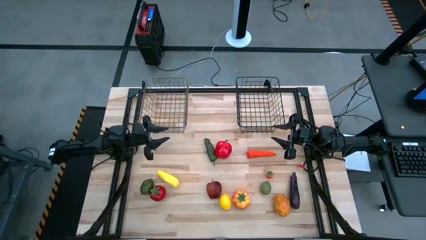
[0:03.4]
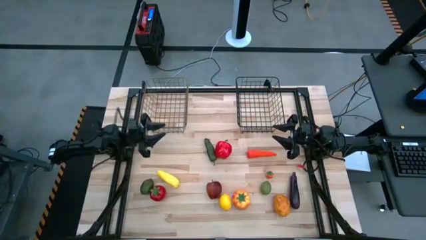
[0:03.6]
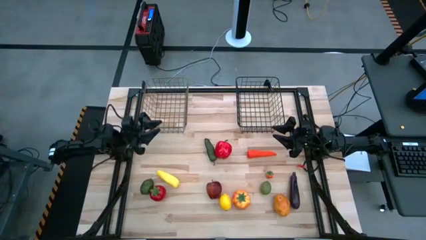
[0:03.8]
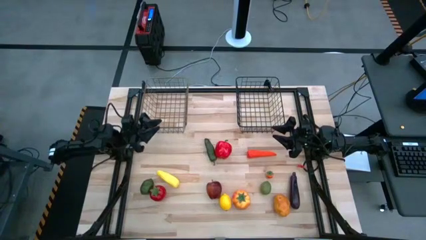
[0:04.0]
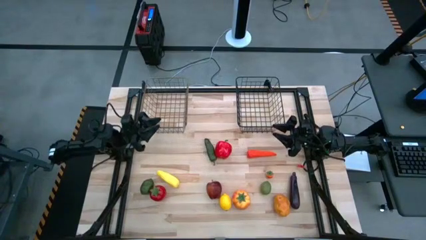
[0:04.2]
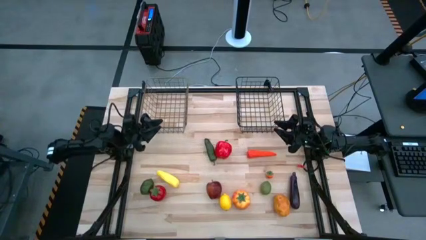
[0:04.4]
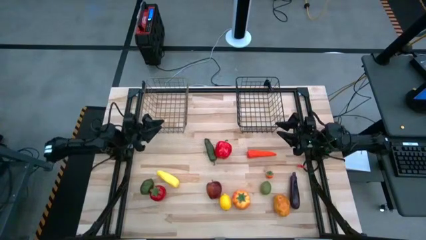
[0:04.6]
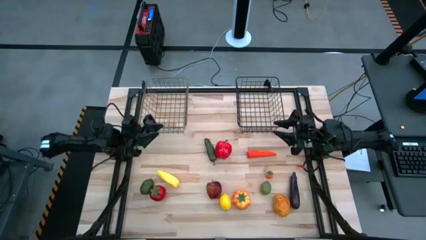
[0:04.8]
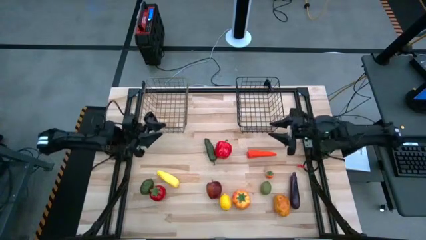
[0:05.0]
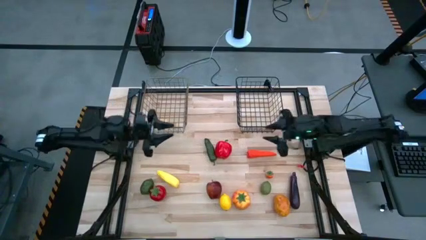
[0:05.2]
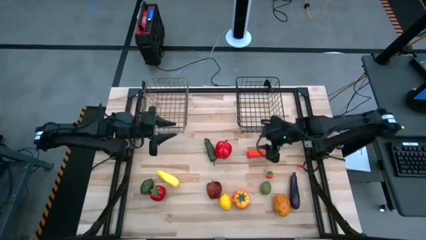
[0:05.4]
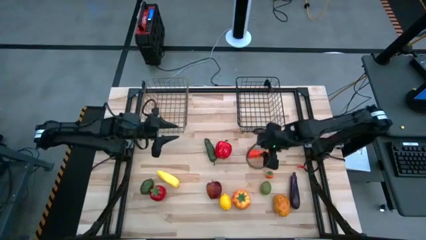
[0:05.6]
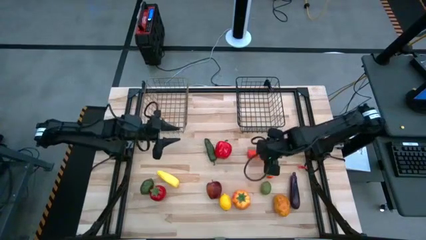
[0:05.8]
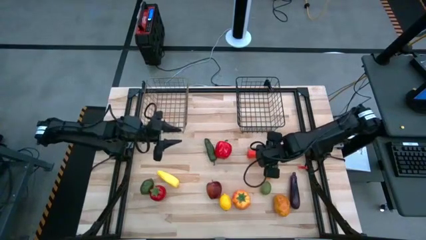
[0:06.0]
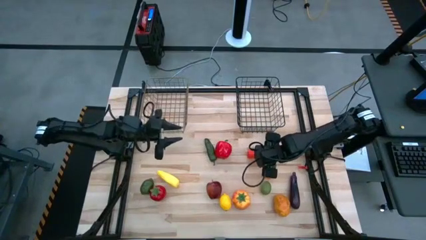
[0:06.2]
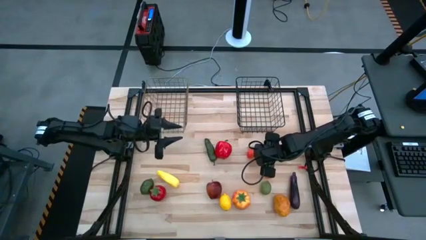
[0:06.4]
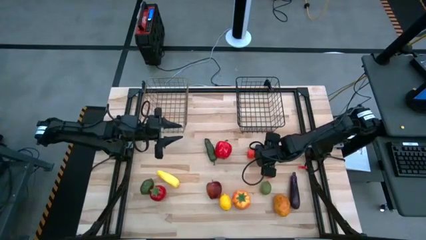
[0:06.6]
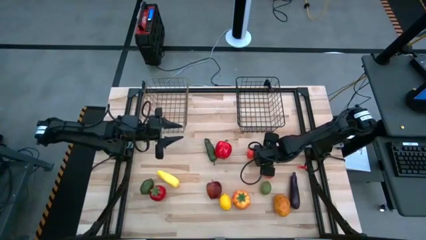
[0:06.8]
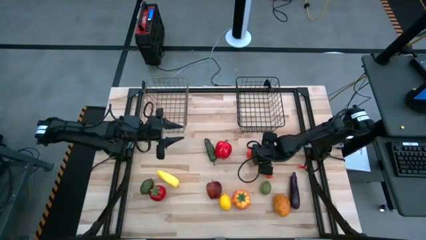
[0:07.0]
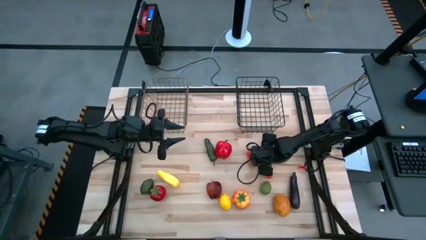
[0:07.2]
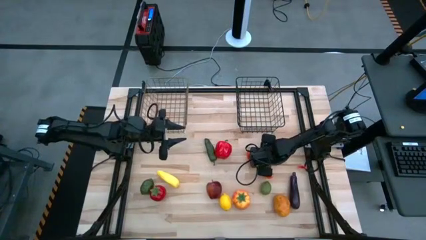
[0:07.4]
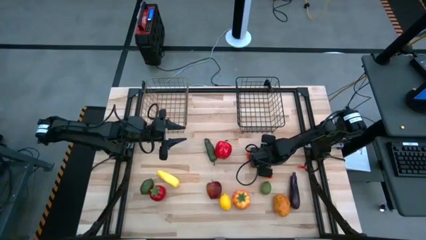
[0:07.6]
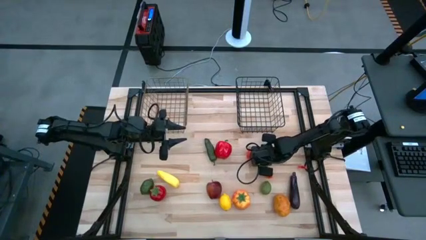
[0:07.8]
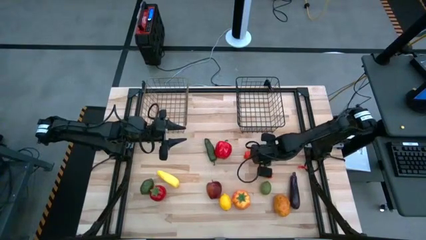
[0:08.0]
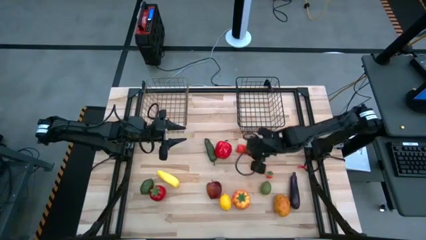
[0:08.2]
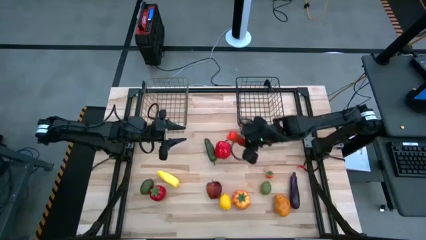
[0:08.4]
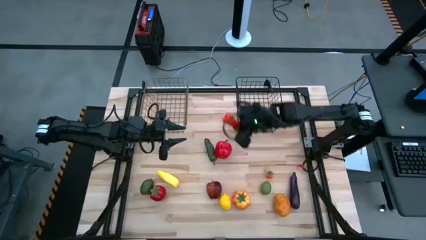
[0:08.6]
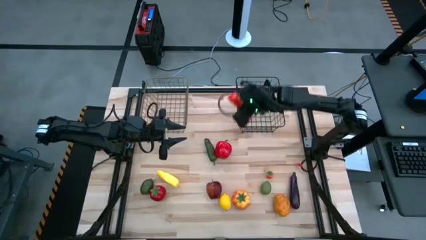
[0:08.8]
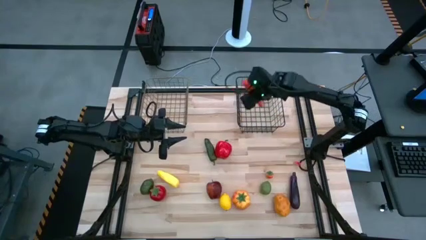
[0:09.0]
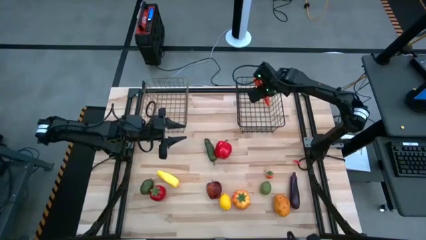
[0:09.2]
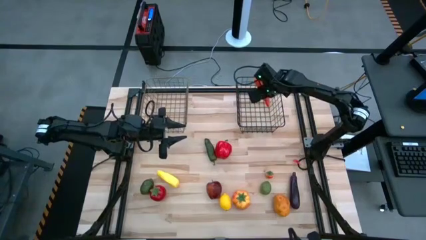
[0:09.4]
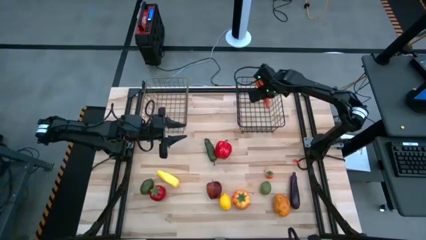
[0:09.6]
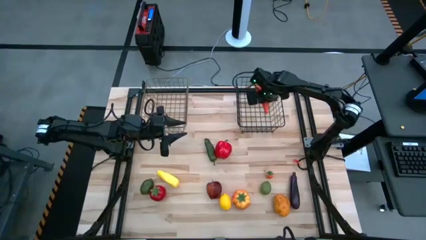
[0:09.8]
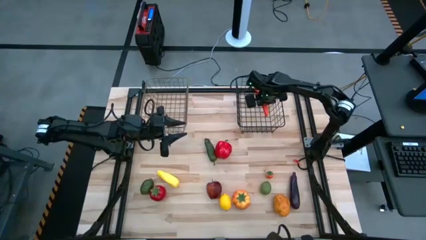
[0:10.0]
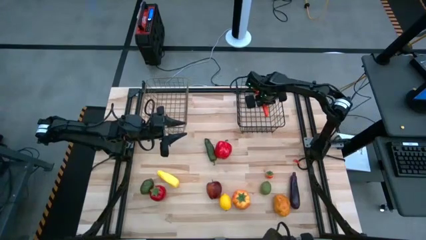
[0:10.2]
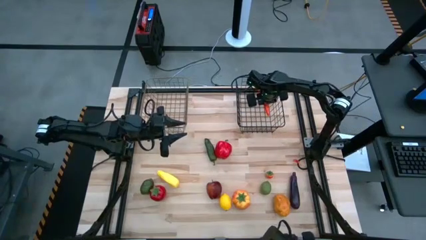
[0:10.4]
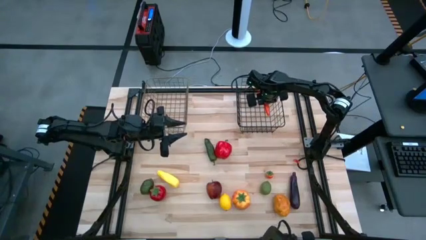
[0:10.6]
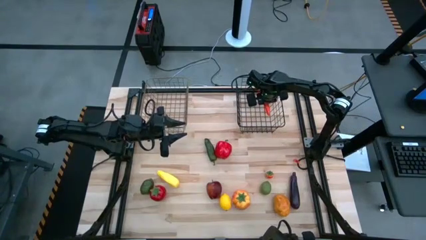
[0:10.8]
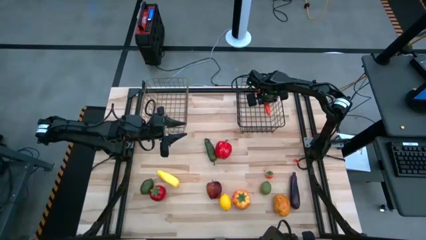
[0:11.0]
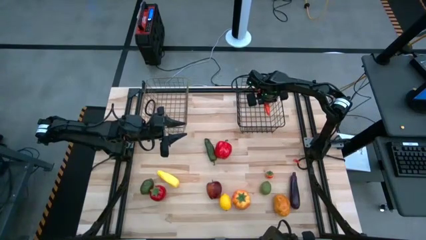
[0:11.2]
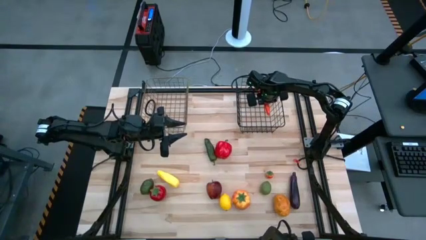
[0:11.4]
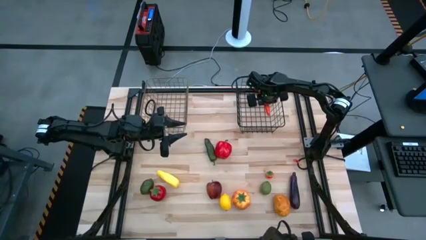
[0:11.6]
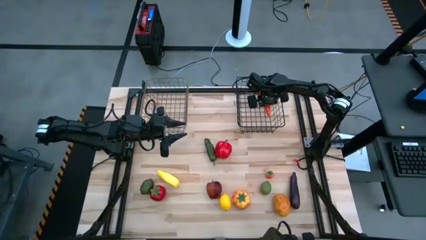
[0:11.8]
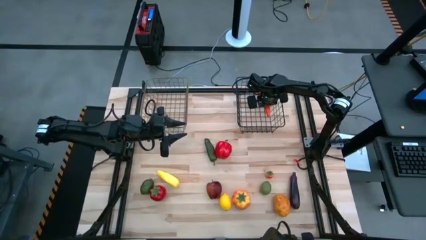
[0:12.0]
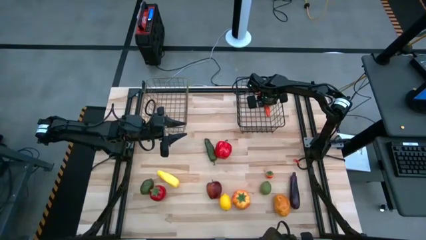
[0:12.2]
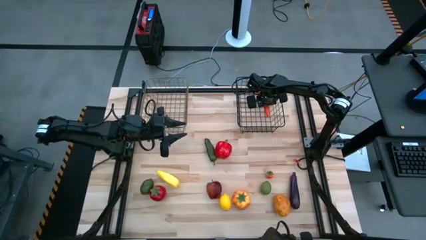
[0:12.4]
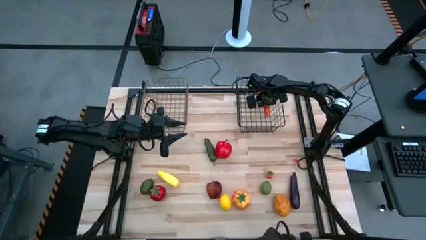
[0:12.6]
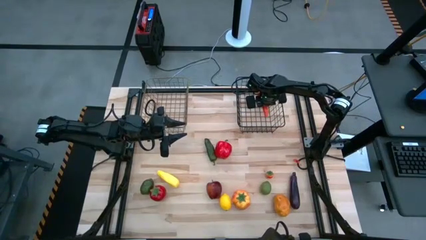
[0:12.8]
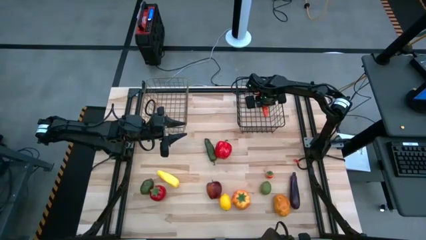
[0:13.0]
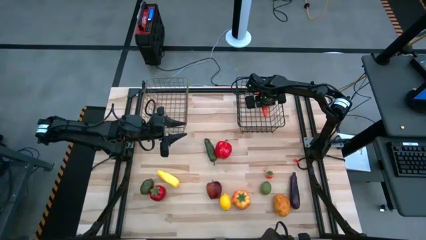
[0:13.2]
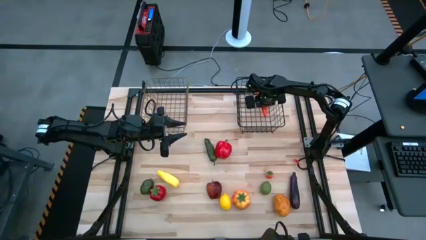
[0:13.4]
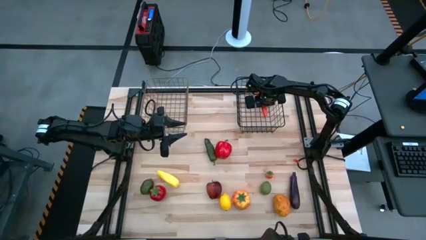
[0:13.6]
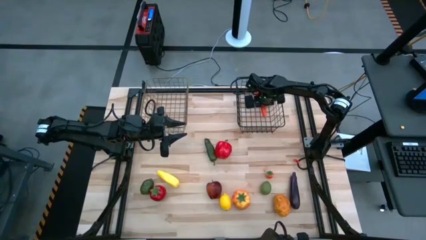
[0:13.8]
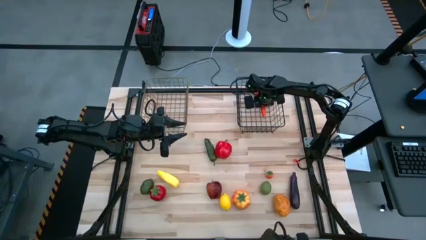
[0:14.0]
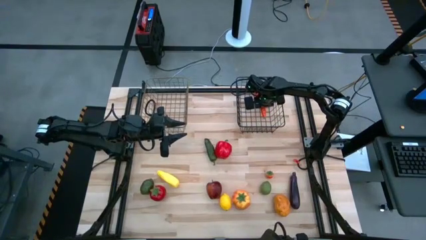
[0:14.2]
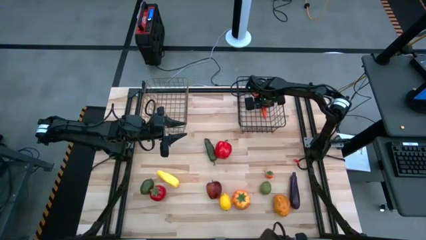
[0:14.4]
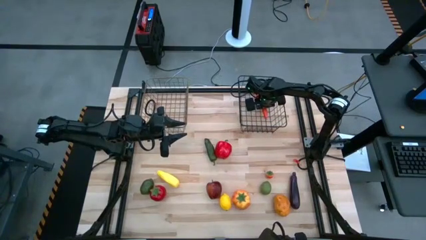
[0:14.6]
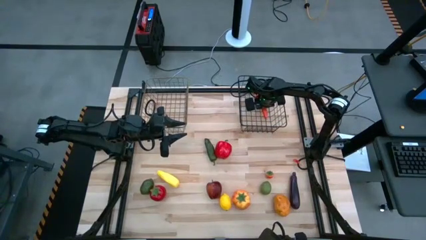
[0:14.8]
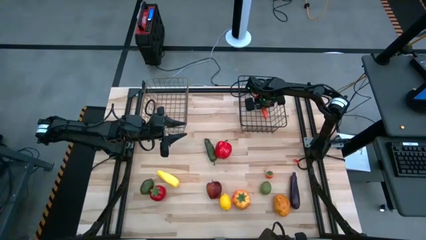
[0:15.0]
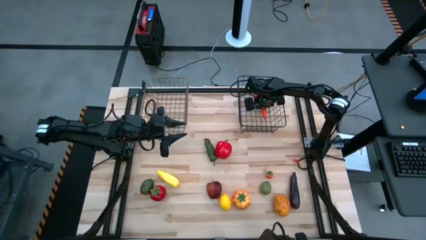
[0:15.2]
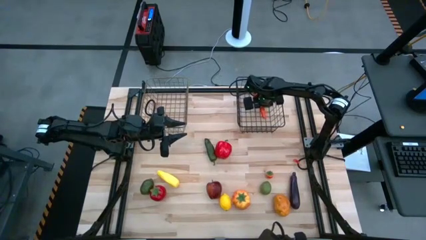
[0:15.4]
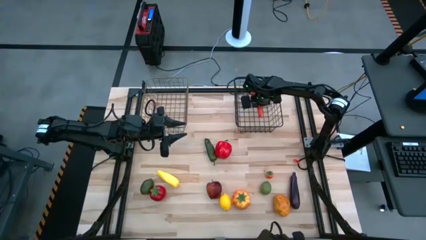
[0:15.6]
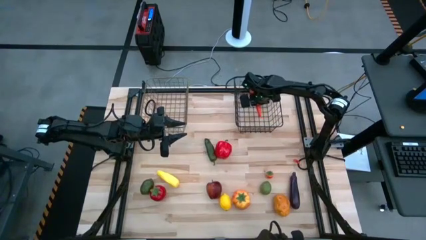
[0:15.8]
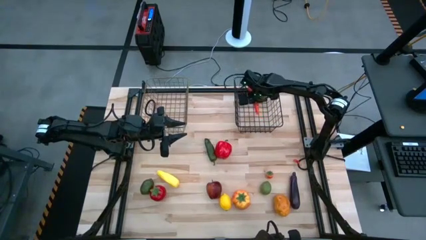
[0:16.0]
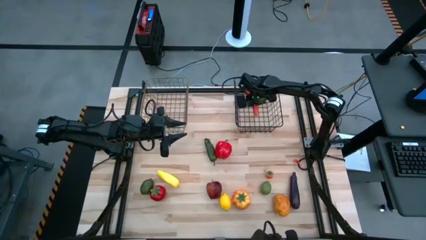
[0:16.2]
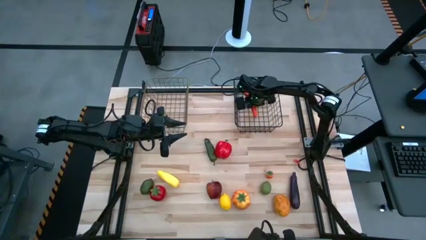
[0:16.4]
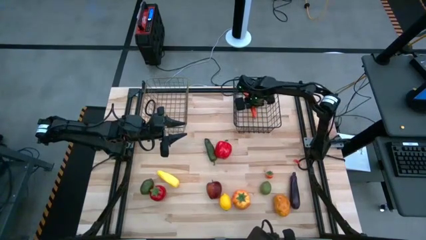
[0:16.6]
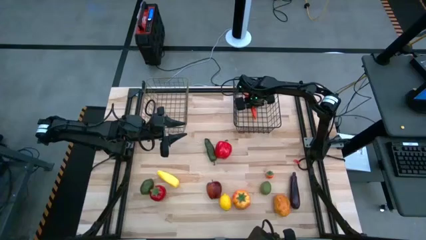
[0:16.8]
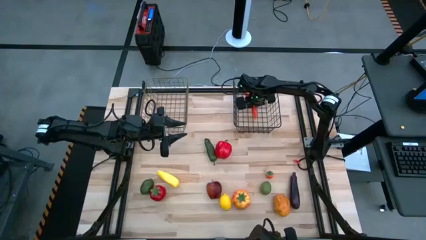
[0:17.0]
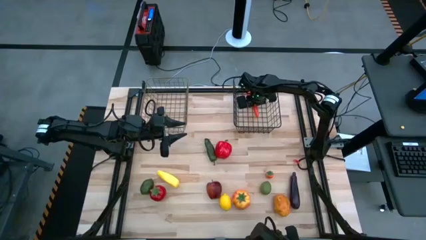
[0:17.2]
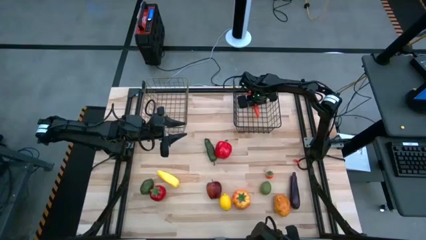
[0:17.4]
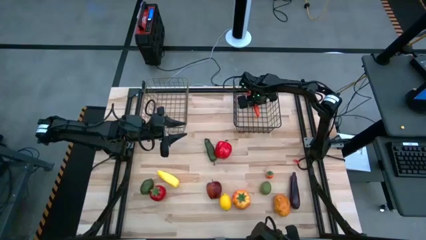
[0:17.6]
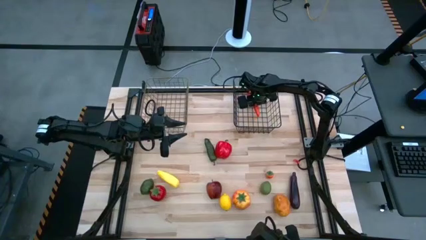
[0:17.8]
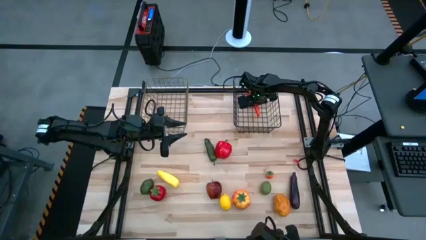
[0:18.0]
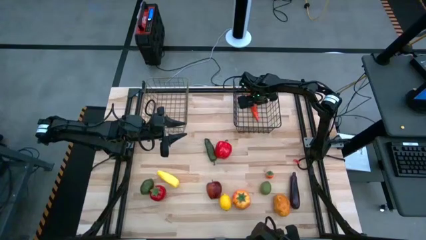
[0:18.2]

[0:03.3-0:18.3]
Task: Sort produce into baskets
Put the orange carrot into the right black wire basket
